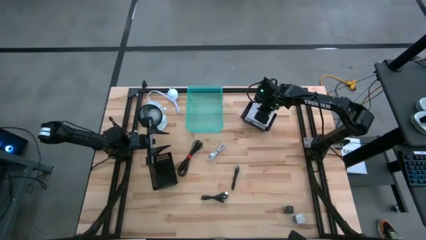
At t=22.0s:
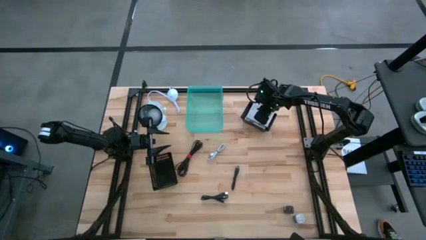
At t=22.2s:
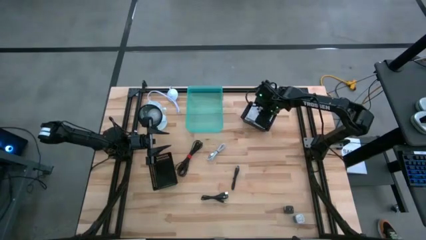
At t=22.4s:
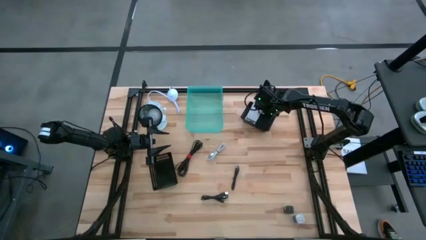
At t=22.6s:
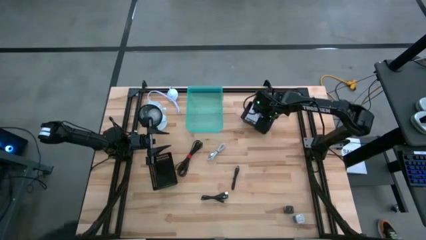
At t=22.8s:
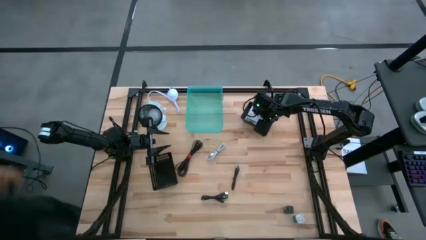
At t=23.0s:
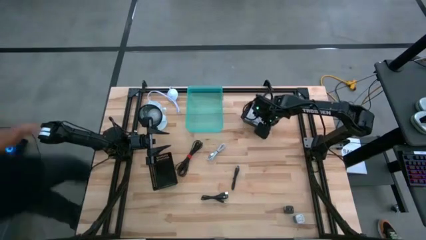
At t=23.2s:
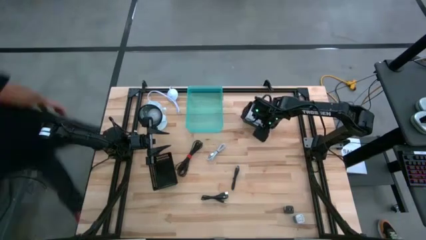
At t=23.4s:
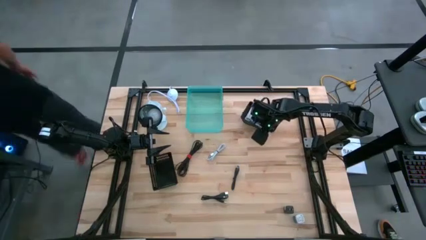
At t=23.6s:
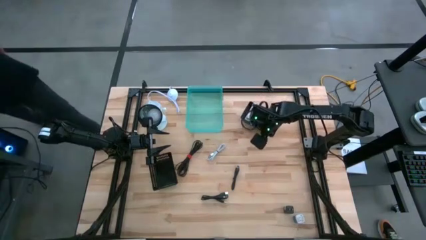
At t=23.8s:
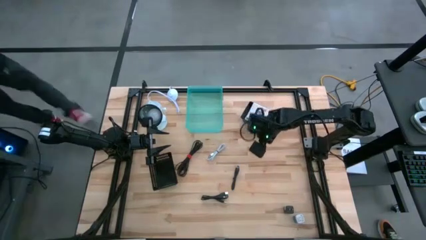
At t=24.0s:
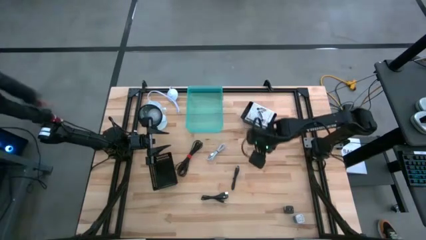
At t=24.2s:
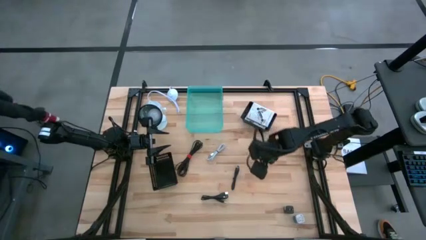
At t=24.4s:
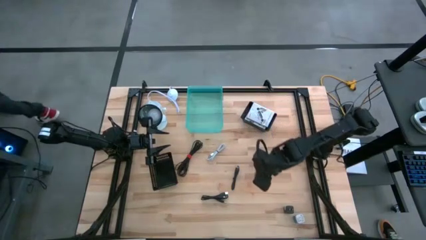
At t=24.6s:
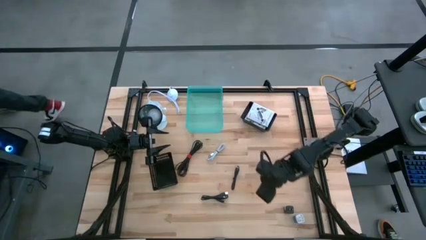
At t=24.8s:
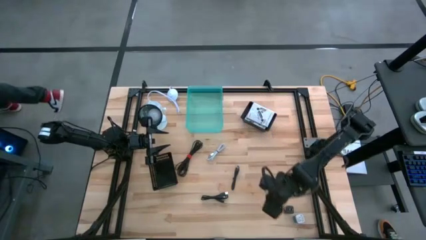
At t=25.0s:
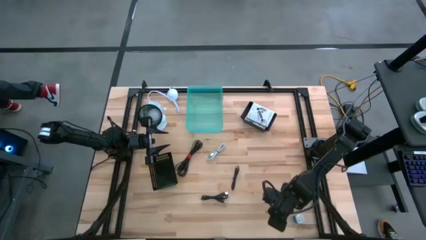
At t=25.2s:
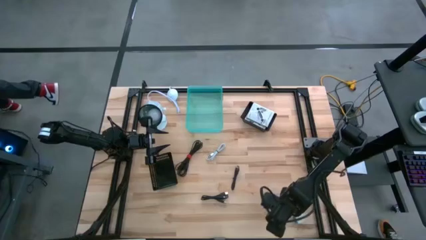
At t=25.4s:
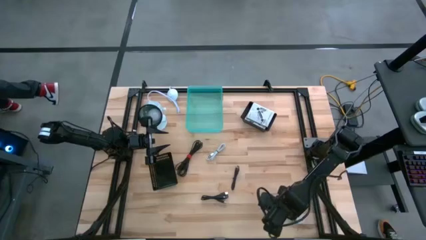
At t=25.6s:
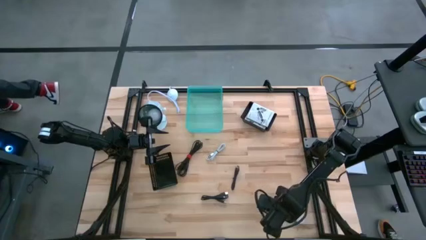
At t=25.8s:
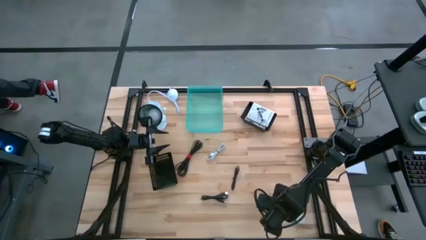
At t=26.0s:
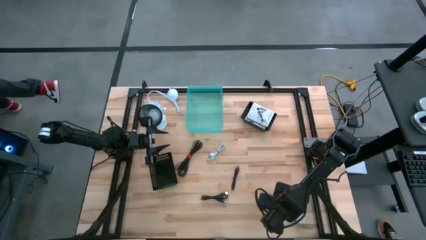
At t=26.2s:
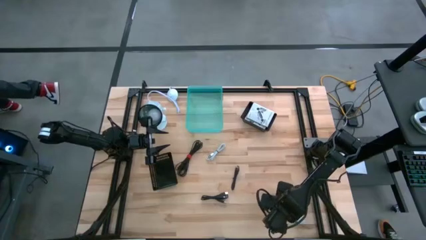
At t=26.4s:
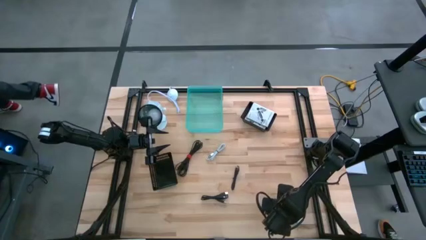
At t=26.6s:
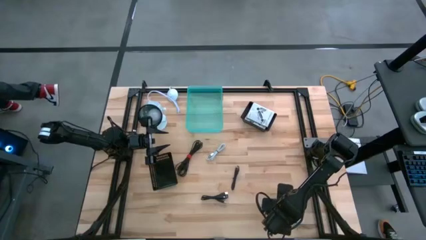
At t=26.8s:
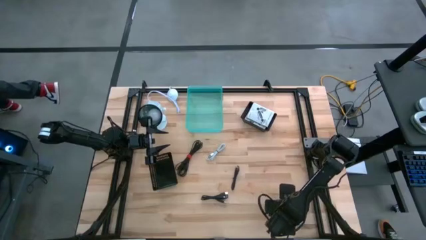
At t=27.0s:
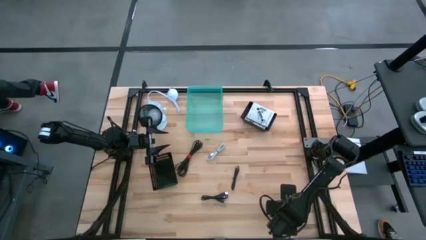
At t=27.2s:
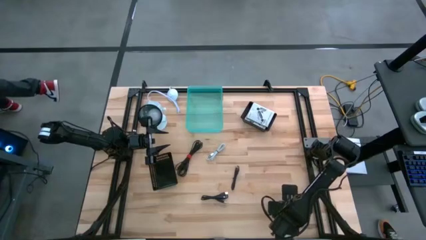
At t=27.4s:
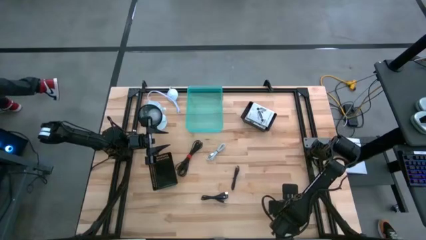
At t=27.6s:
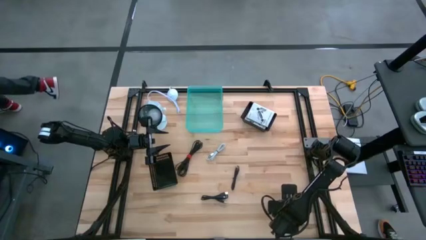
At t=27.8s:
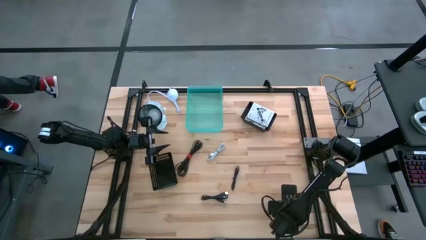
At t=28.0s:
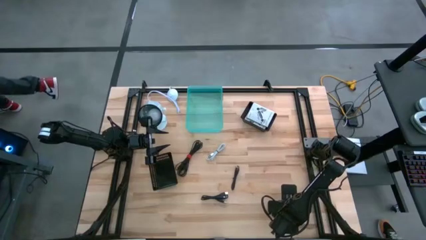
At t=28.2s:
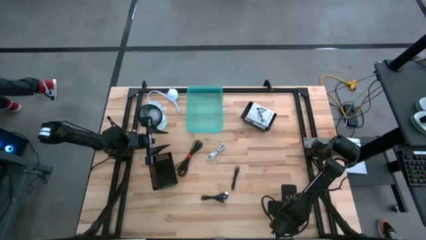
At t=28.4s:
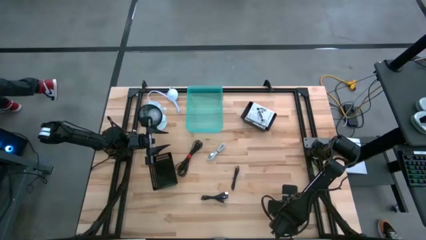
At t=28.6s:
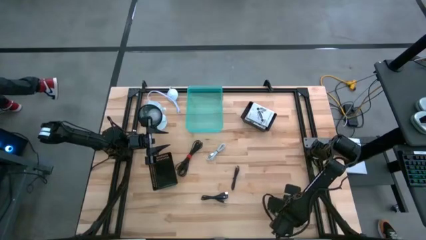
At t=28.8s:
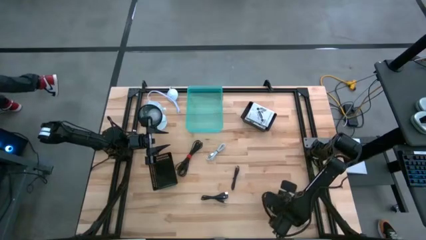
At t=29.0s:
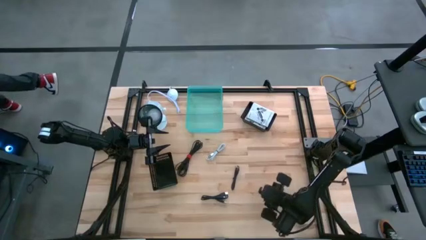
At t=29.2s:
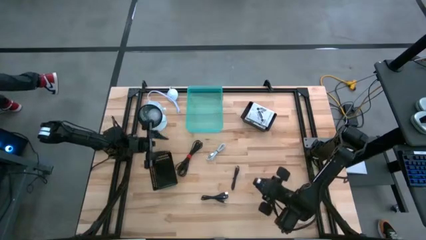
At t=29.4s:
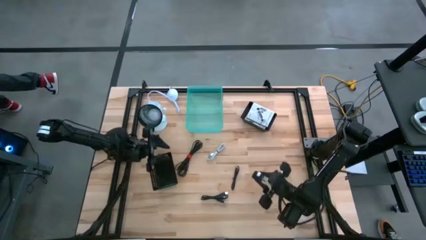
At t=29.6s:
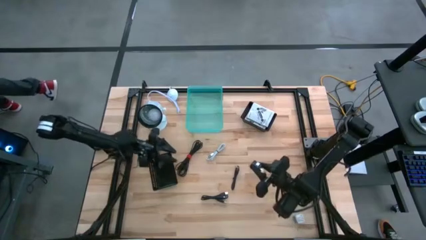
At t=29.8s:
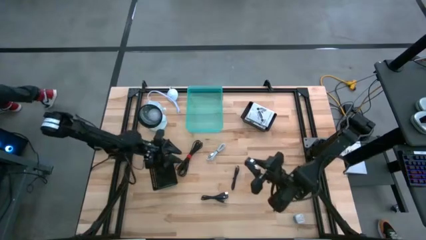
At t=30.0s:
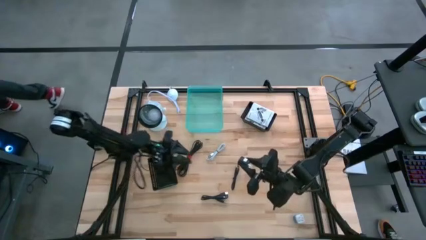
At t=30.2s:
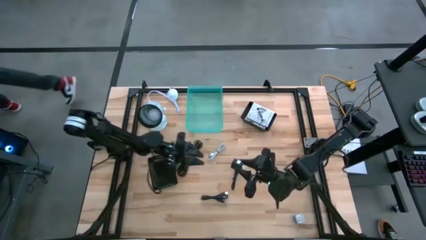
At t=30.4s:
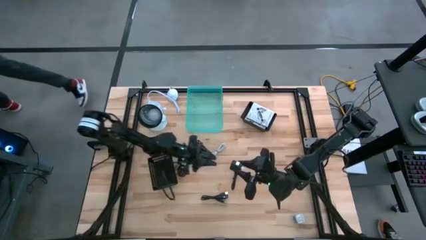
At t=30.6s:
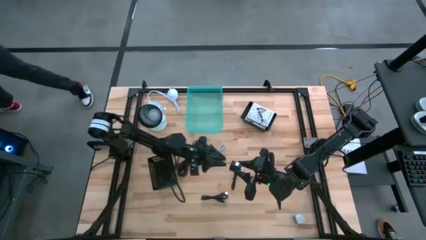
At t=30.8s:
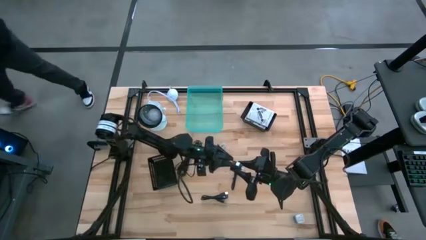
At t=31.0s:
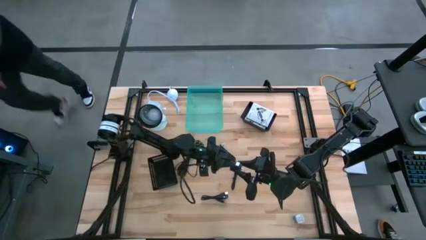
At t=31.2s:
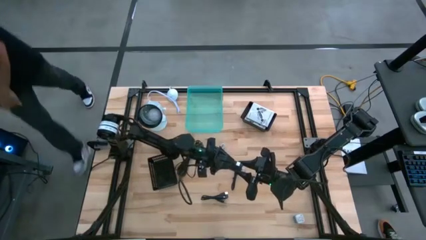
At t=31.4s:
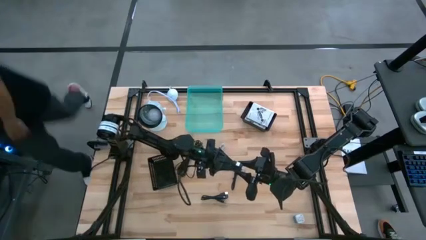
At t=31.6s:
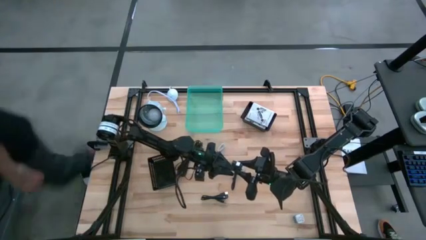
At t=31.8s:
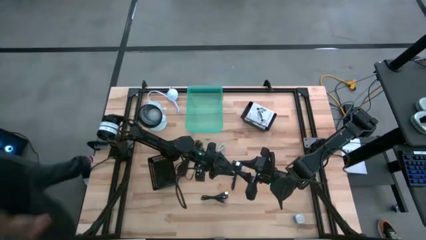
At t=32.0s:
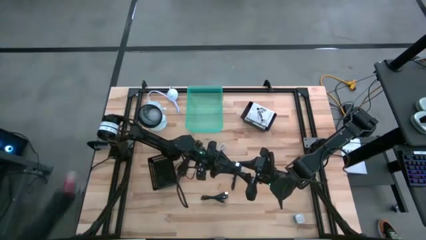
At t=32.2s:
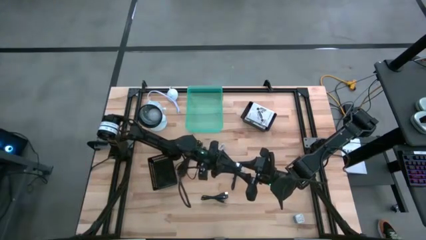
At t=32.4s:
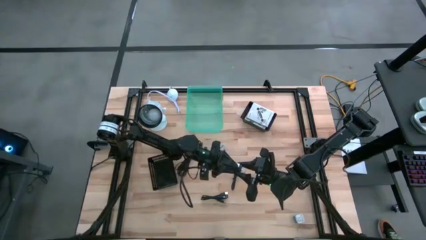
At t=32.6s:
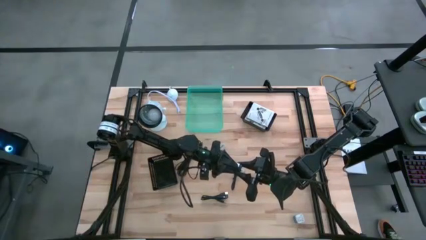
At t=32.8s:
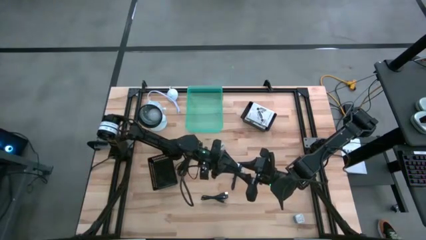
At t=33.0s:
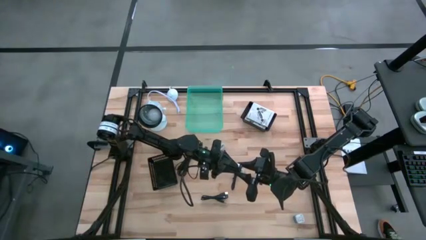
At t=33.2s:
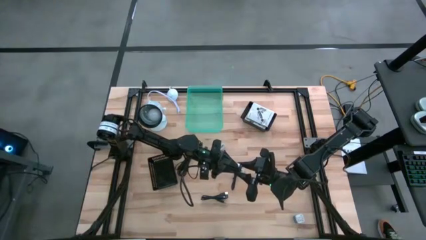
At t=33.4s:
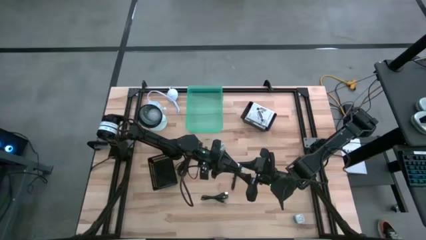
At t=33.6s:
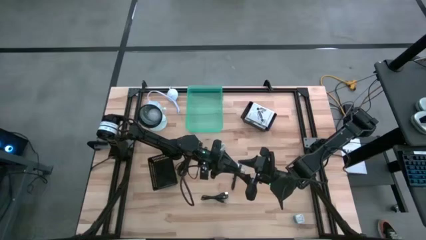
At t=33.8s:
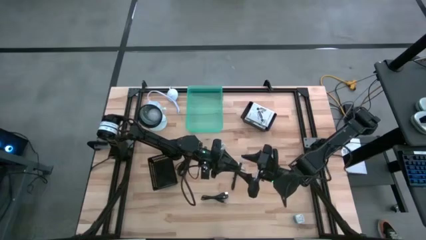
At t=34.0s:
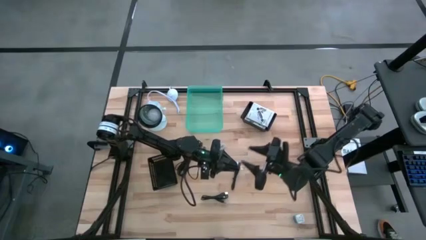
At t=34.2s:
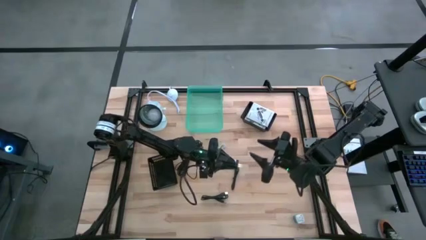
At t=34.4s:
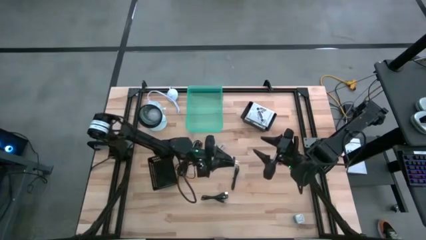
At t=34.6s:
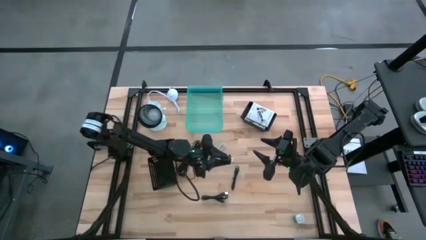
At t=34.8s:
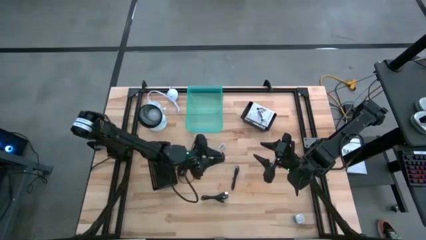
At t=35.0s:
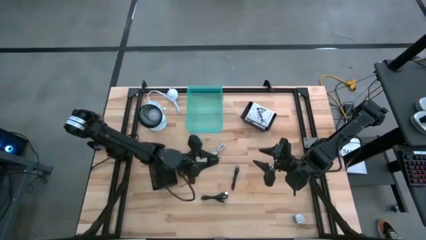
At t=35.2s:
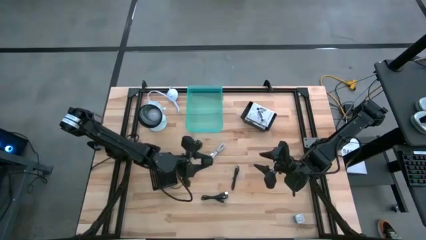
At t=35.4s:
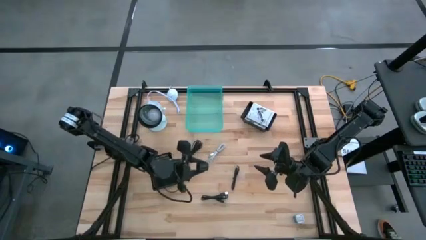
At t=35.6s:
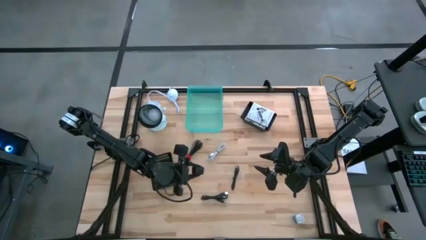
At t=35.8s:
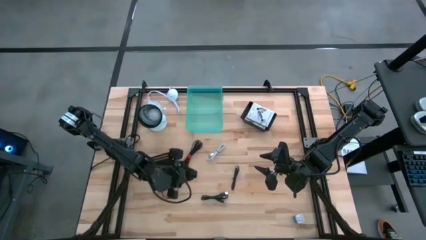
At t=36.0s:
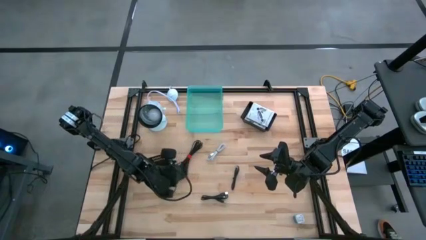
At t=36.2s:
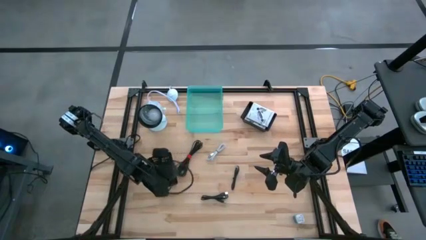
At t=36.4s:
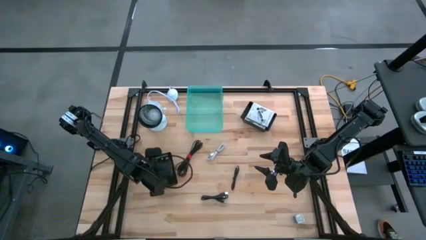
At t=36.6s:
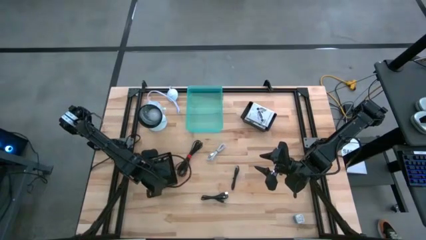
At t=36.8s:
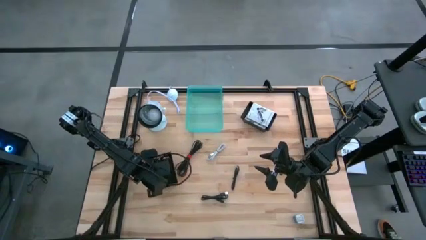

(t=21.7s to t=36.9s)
Task: Pick and place items into bin
Put the black charger adapter into the left black bin

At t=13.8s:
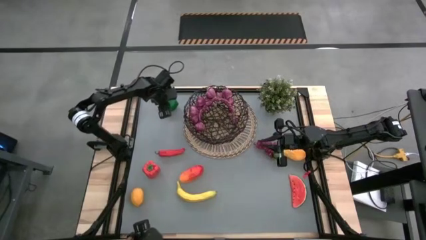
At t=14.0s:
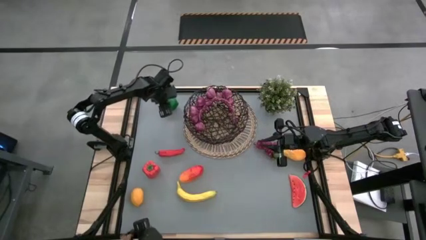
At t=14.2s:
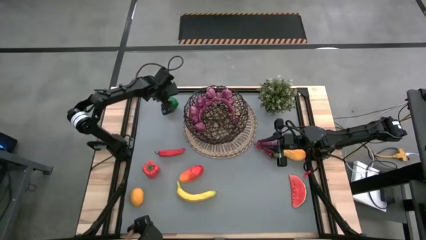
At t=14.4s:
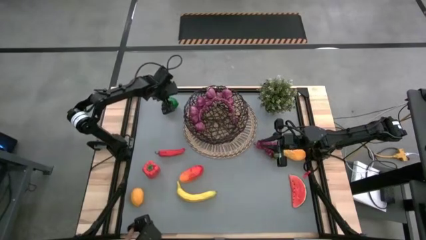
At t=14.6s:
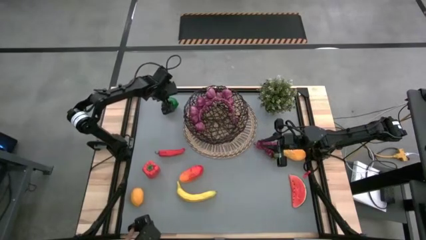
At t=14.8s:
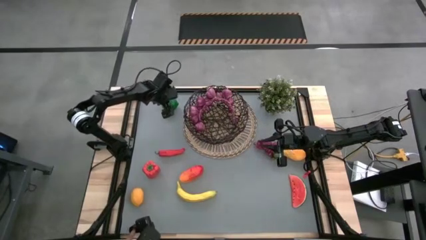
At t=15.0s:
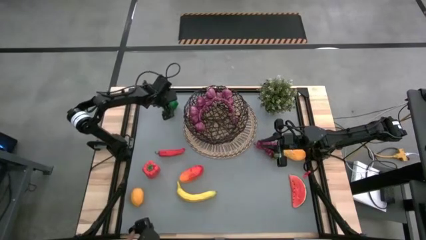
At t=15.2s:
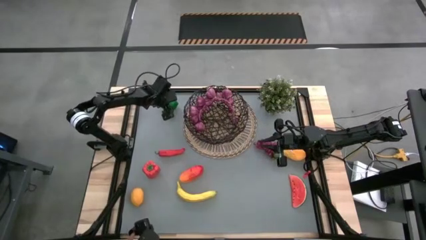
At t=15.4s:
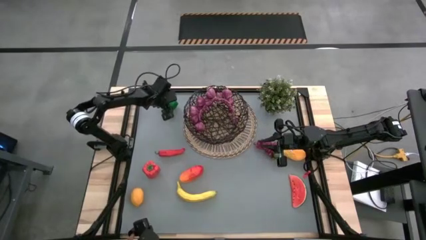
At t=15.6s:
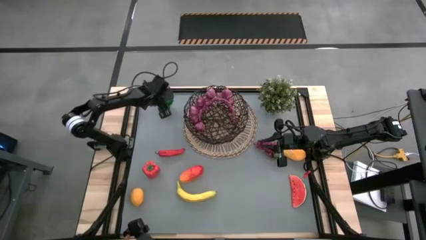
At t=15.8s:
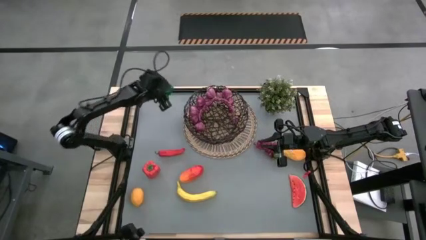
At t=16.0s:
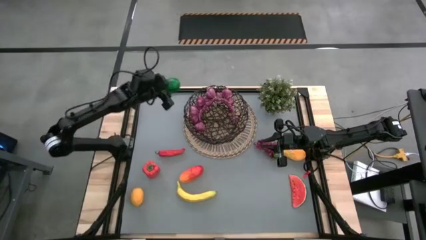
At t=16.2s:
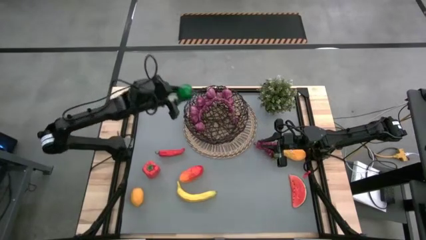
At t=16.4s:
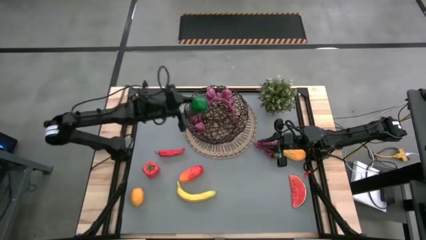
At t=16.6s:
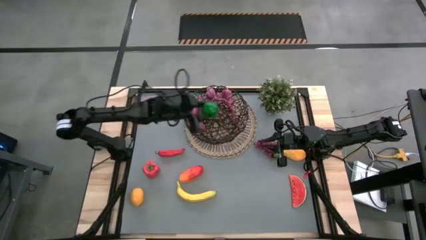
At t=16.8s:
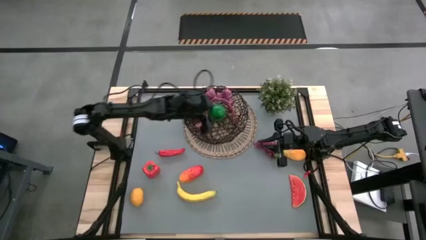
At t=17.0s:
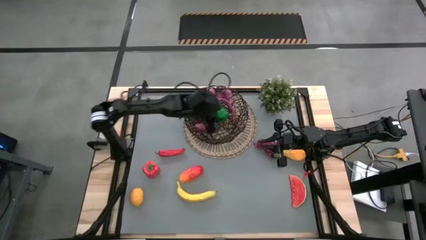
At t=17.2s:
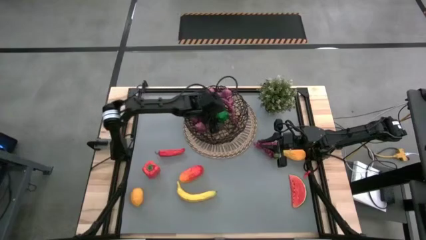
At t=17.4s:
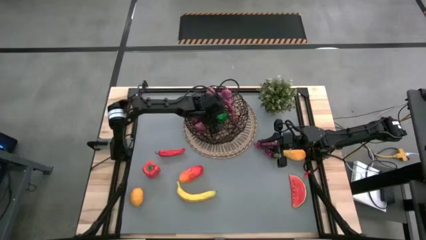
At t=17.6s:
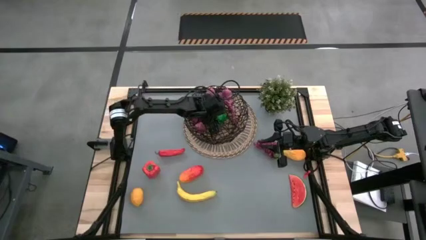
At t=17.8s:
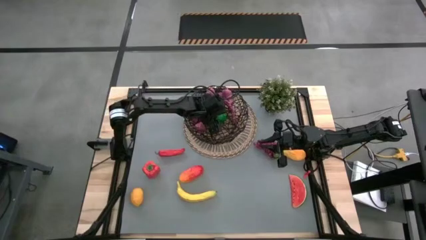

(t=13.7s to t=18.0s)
Task: Build produce basket
Put the green lime into the basket
